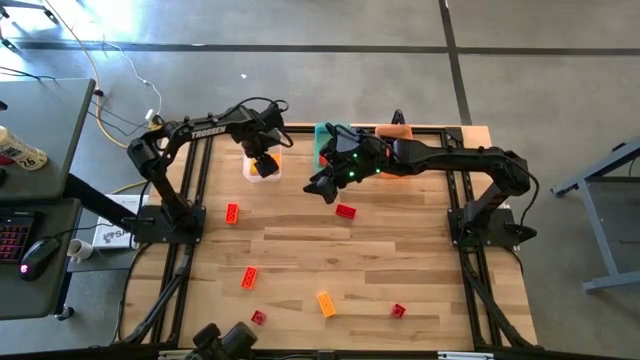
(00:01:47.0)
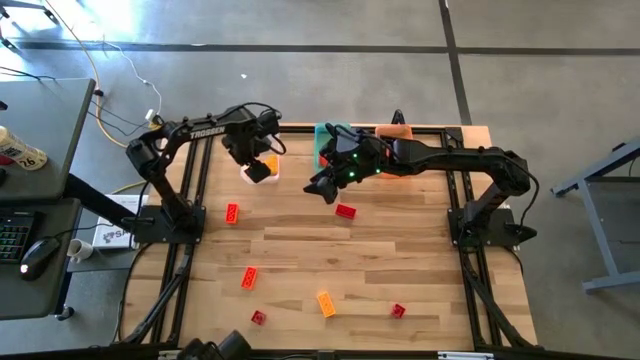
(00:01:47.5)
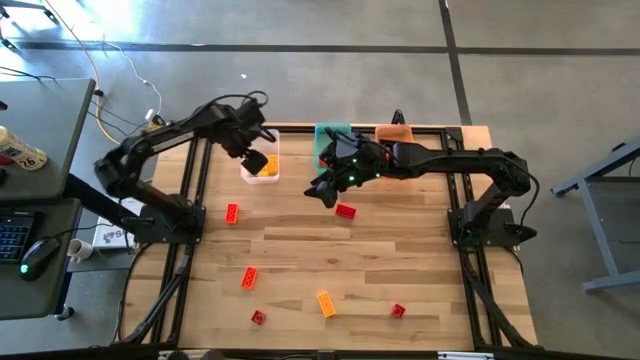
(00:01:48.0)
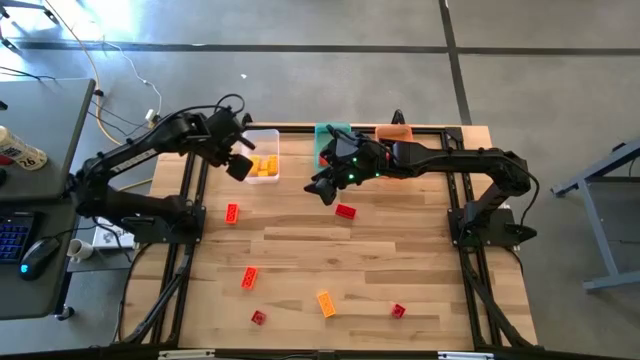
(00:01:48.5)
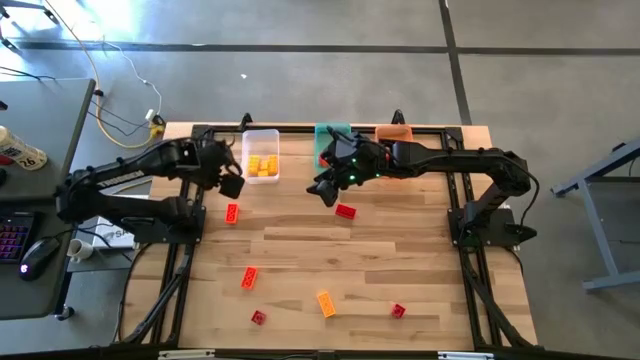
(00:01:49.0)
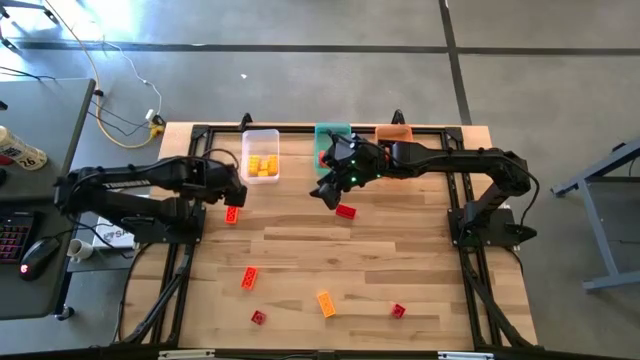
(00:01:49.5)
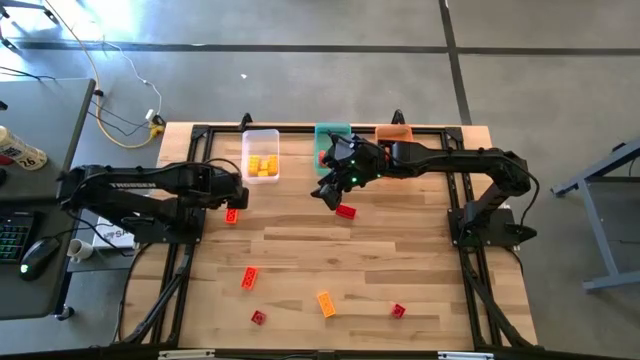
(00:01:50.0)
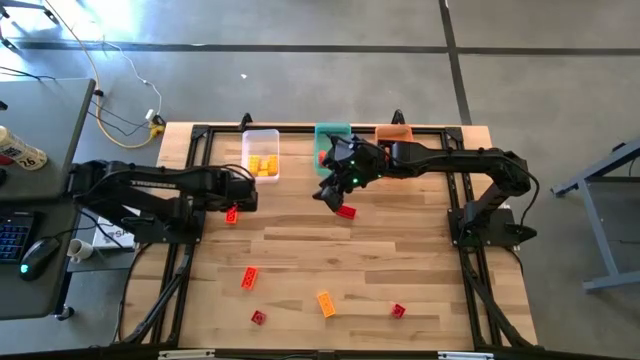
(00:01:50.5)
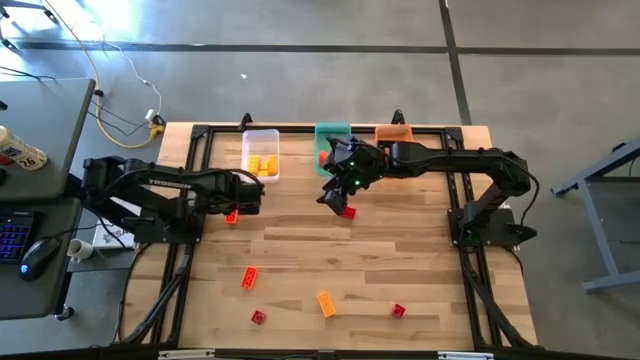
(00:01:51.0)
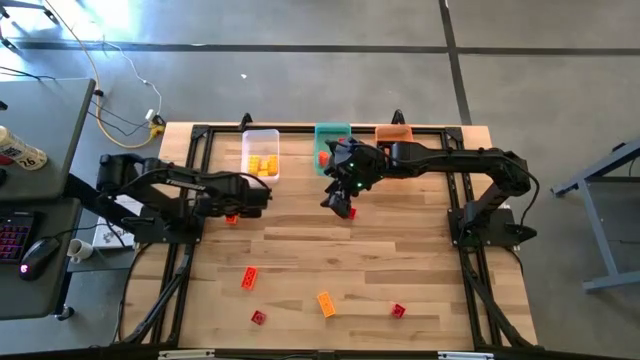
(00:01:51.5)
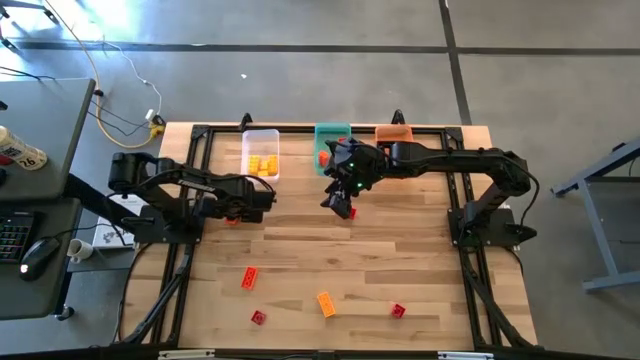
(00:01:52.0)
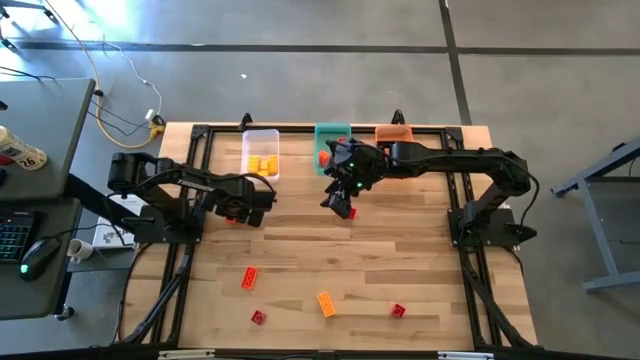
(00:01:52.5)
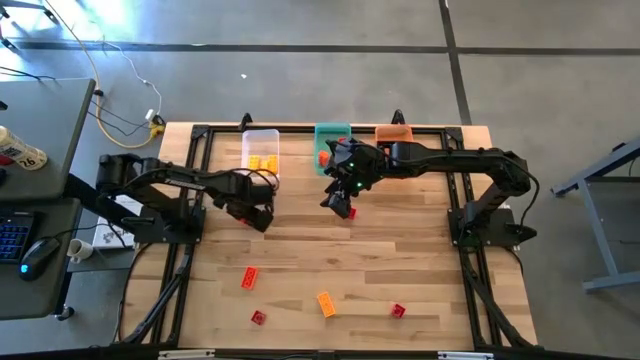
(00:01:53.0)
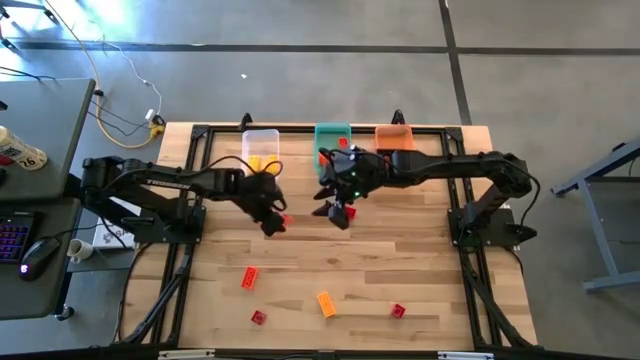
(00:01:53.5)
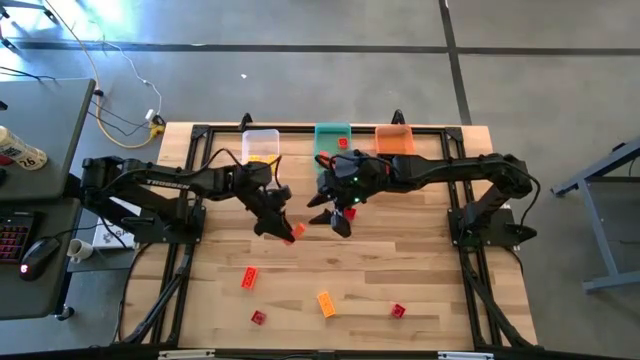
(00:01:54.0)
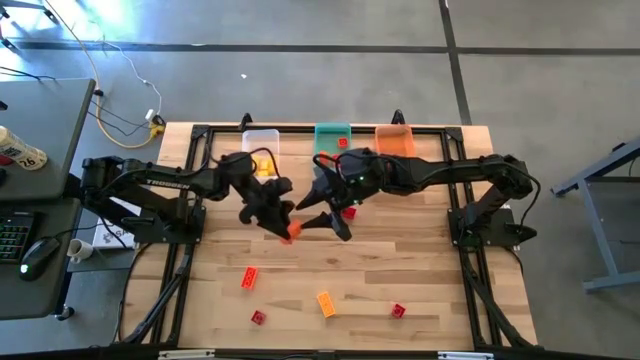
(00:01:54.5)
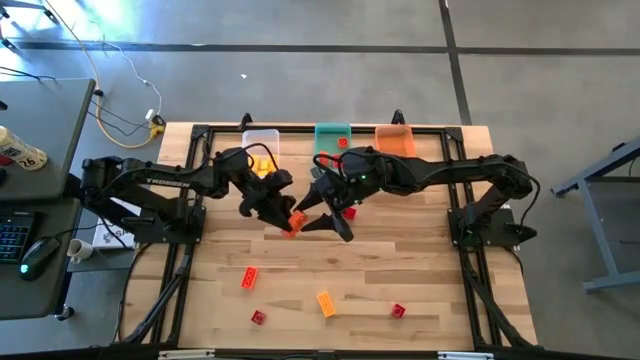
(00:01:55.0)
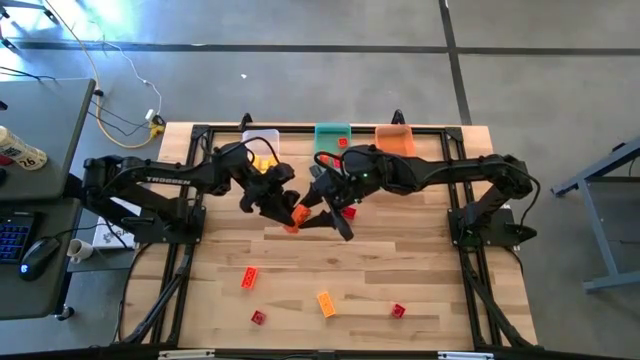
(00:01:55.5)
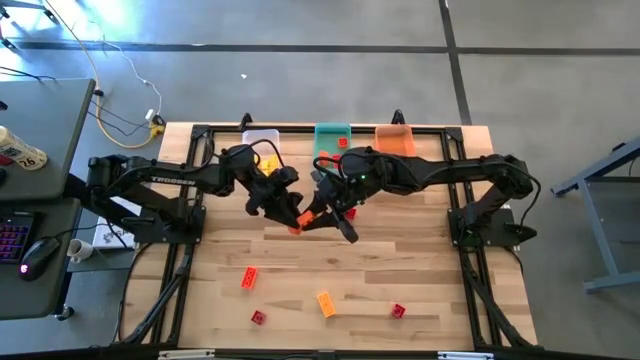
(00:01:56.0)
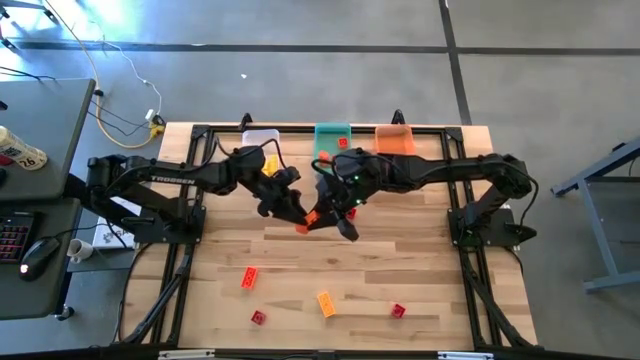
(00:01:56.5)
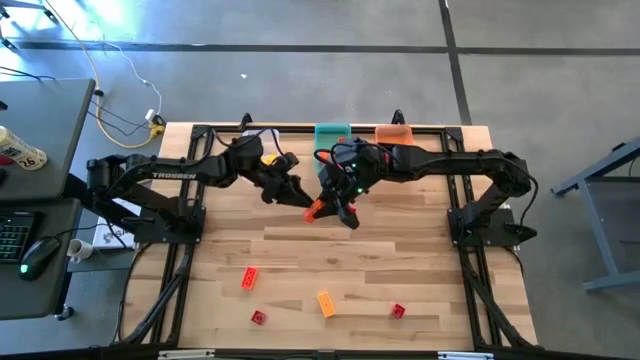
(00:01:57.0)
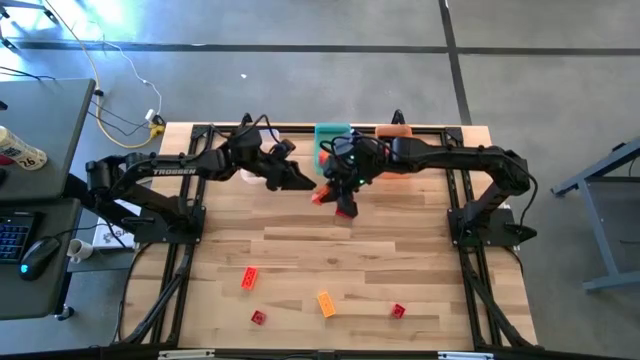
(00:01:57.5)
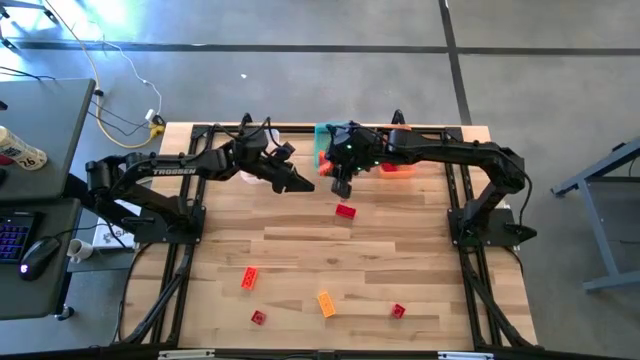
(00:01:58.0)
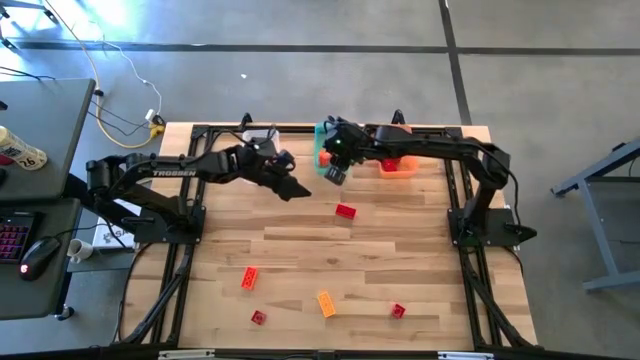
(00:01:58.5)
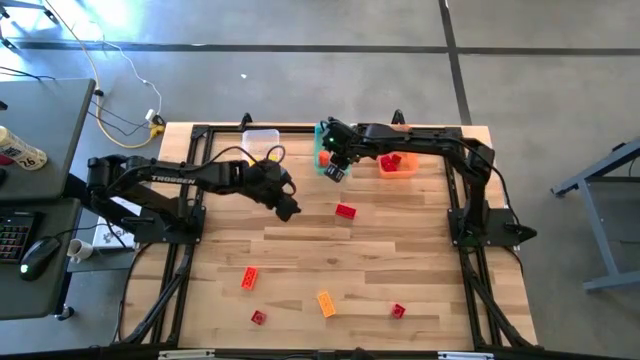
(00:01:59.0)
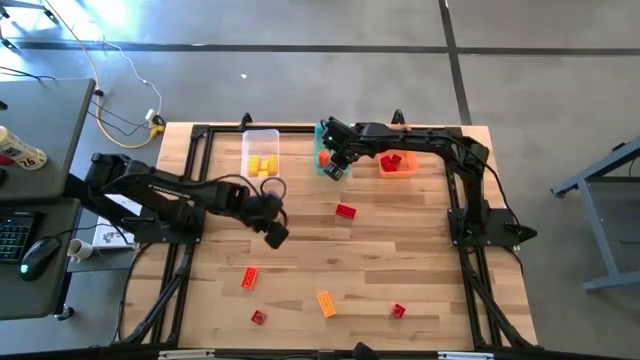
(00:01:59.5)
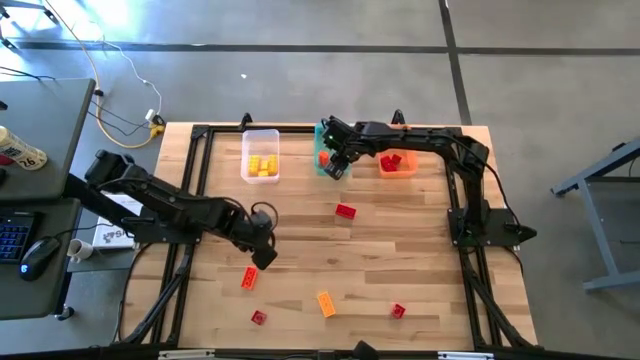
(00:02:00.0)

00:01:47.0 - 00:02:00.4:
Task: Sort & place blocks by color
Put the top orange game piece into the blue bin

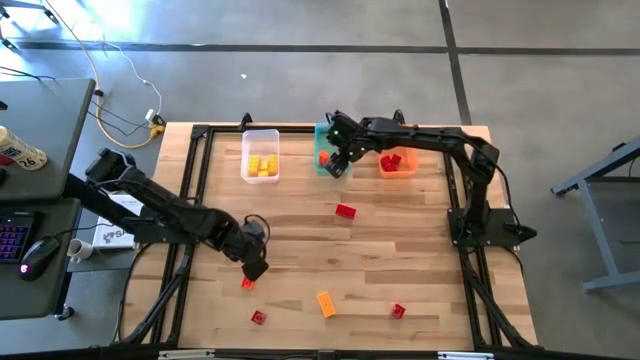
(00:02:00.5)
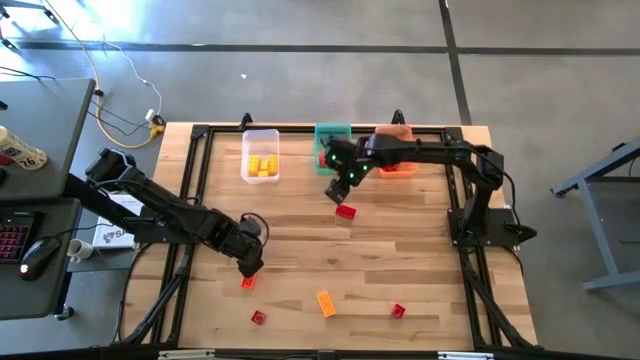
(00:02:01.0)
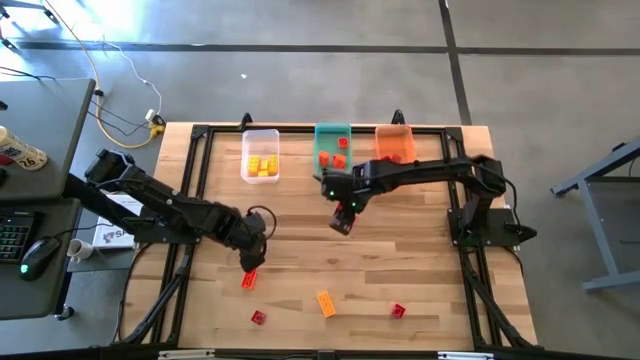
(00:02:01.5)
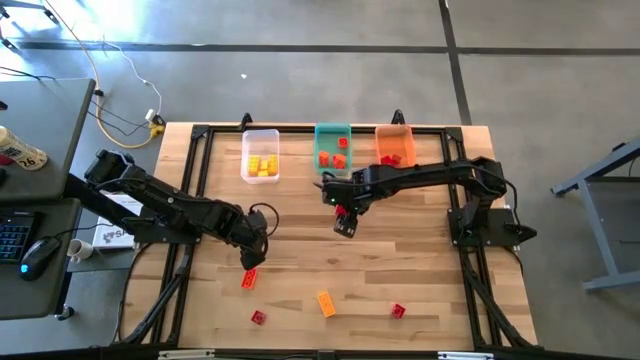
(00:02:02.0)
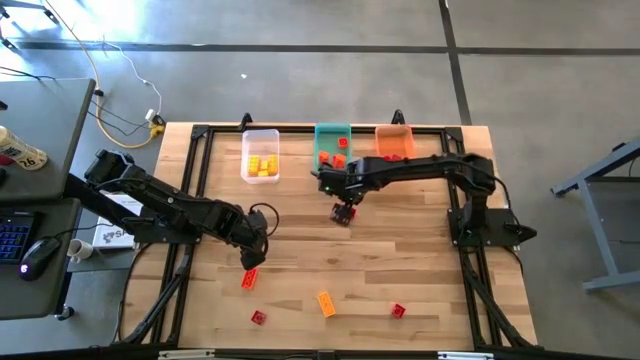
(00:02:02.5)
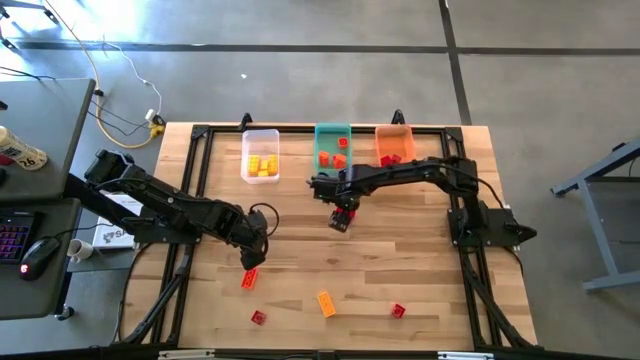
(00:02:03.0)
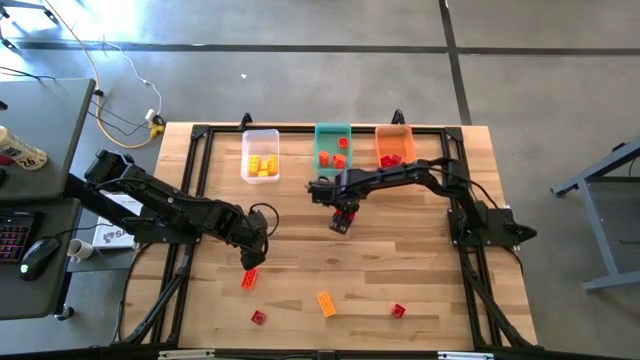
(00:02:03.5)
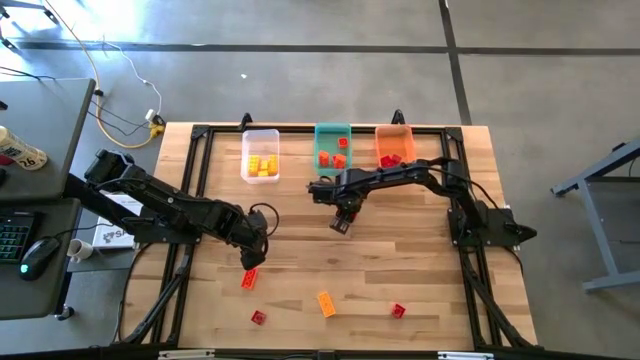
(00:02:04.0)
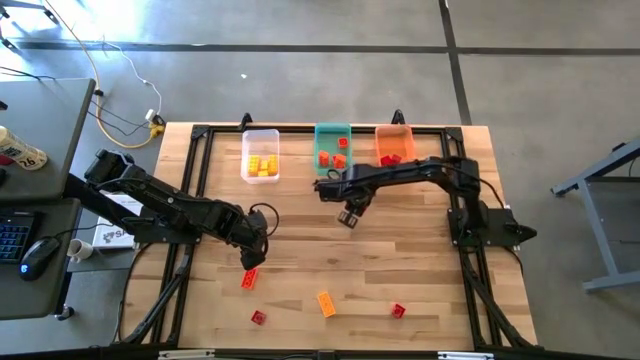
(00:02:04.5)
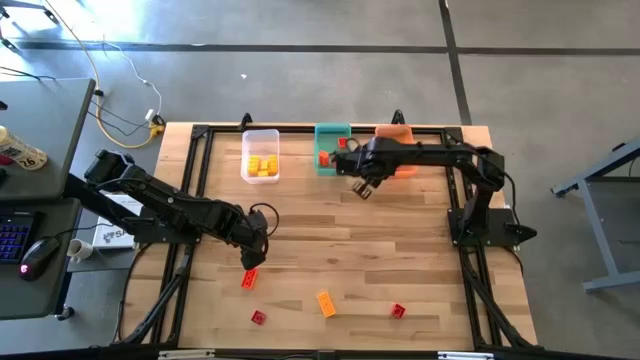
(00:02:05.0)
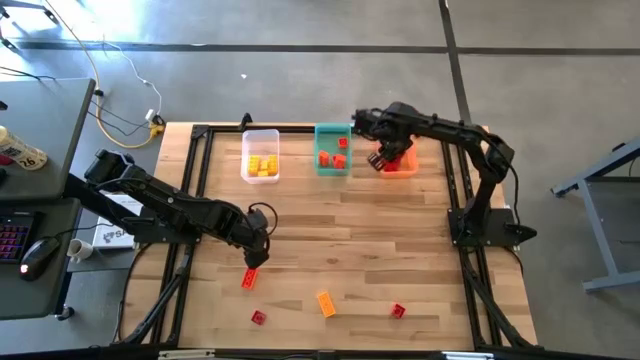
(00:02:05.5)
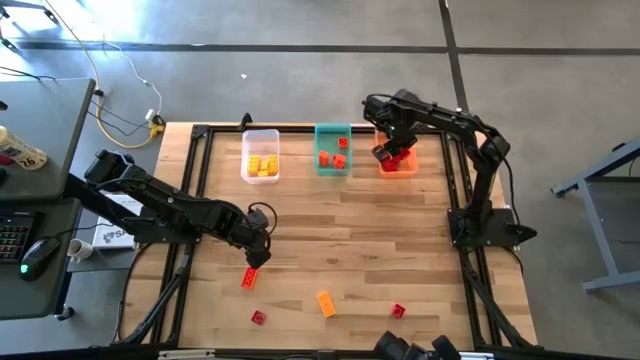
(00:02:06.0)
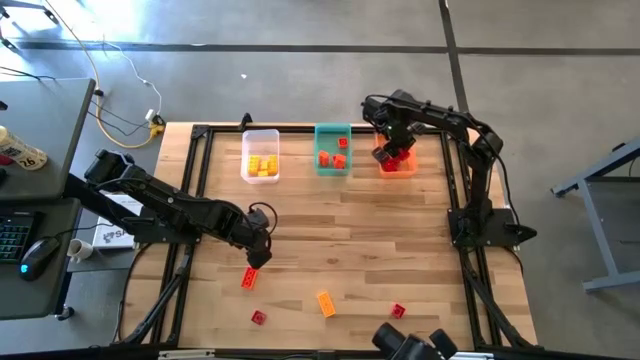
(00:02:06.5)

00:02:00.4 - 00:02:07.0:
Put the red game piece into the orange bin
